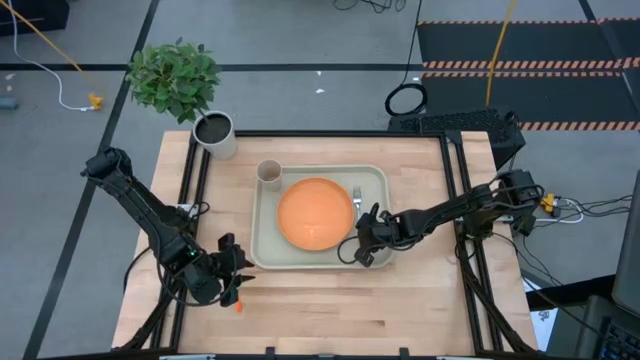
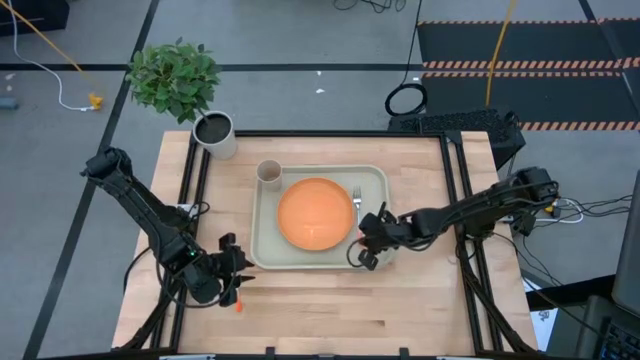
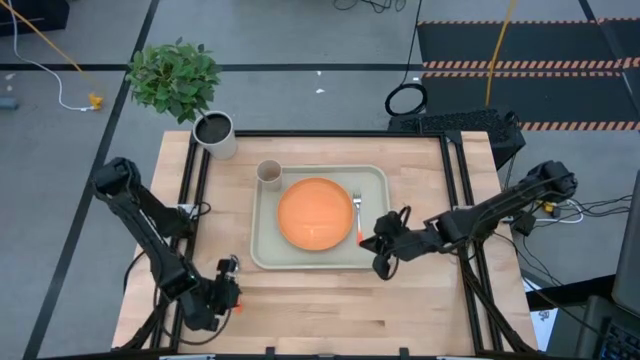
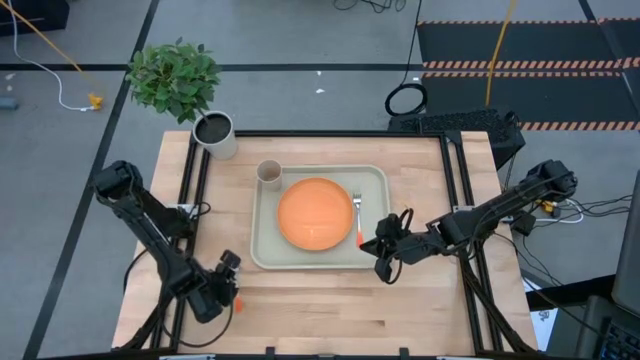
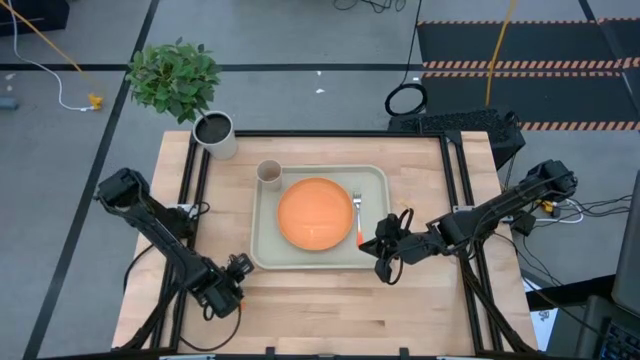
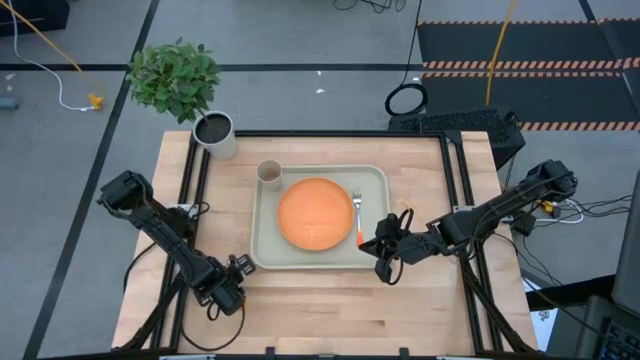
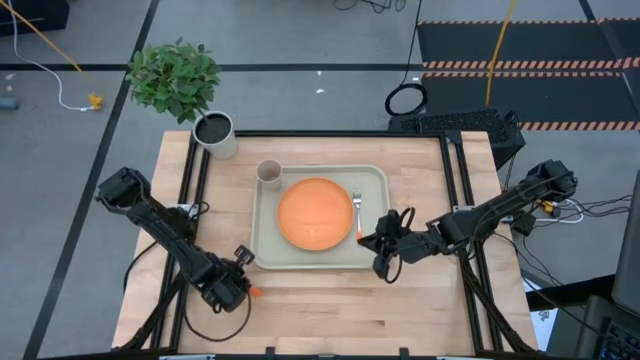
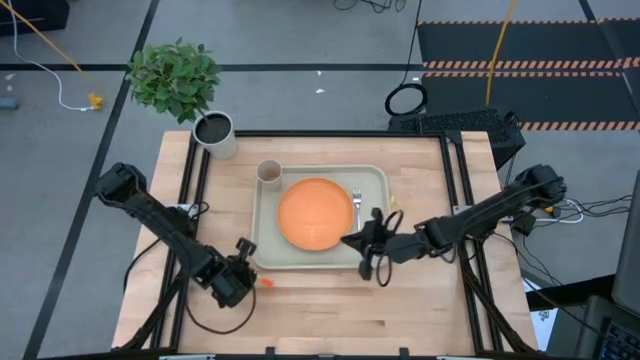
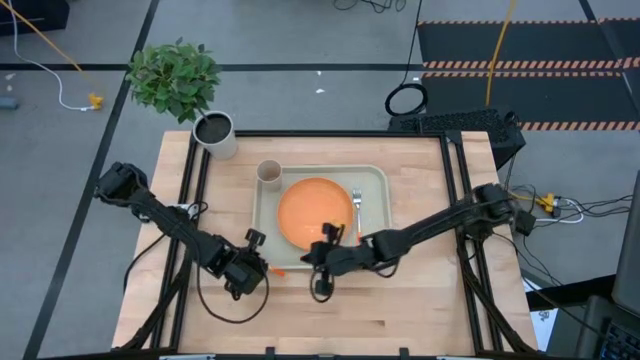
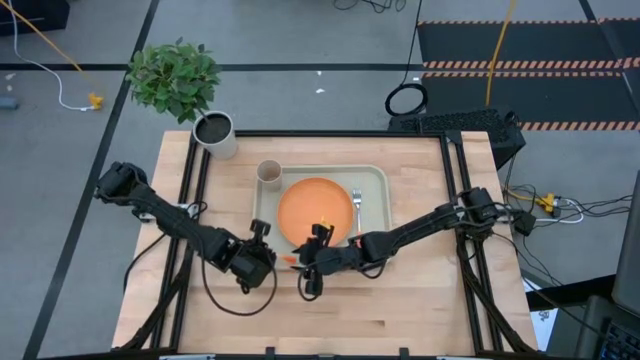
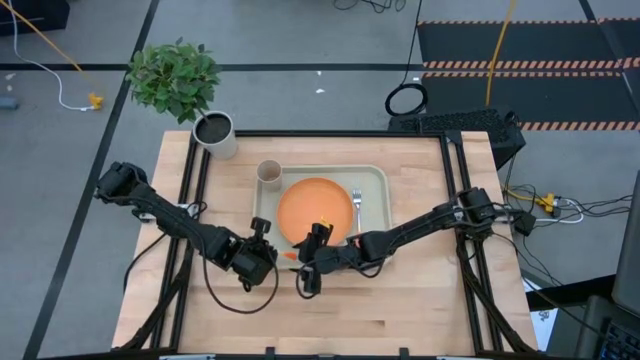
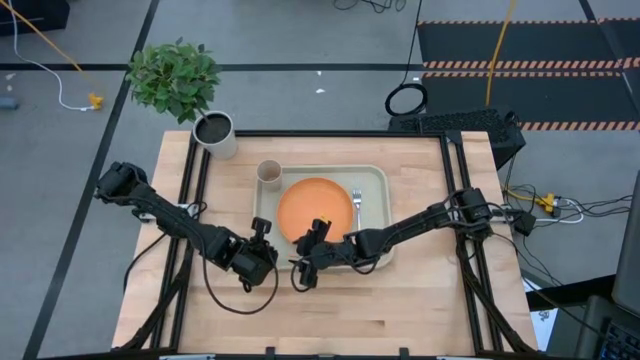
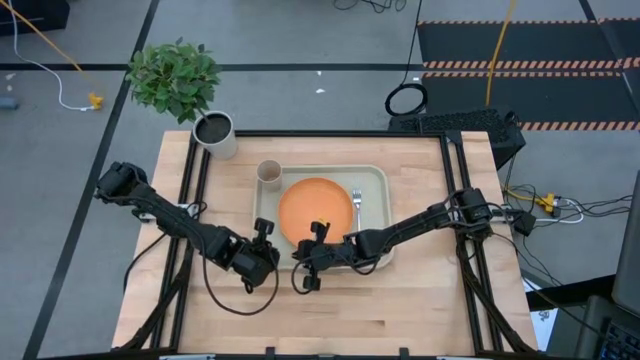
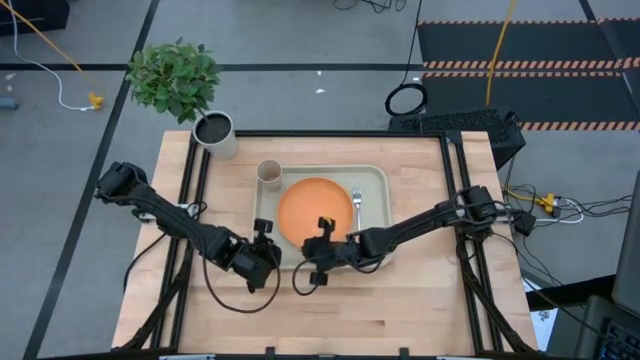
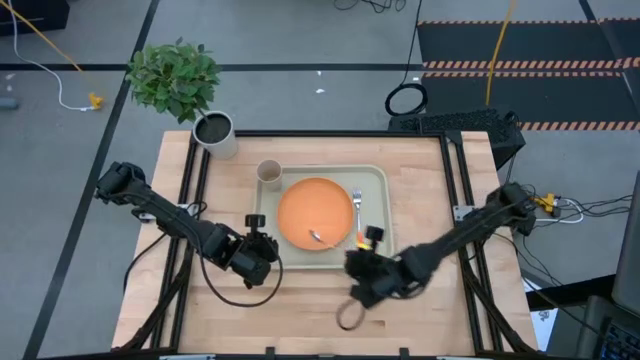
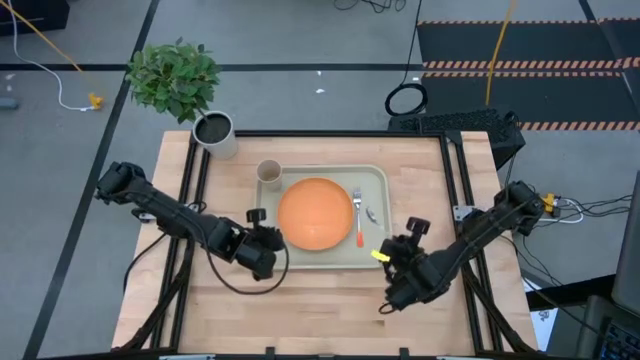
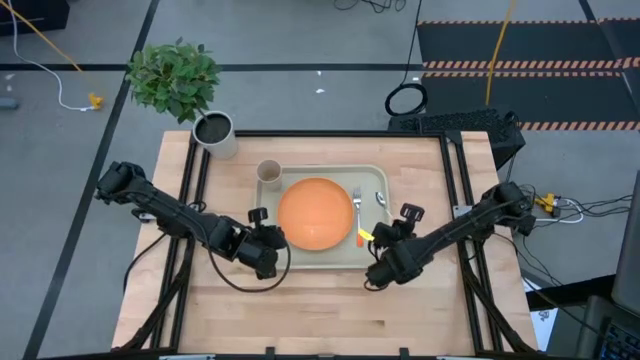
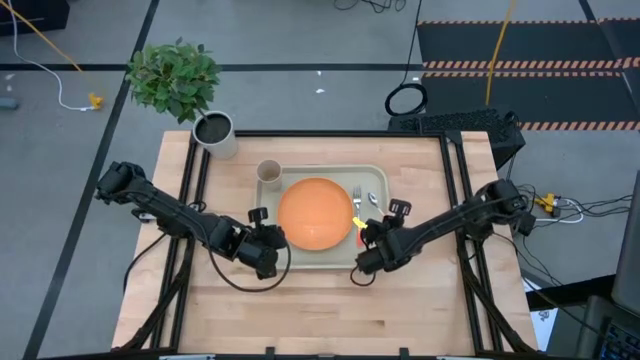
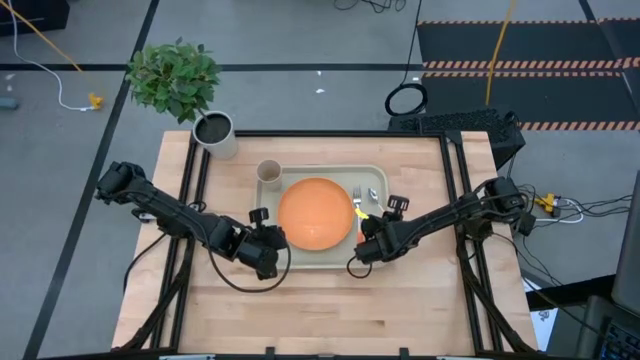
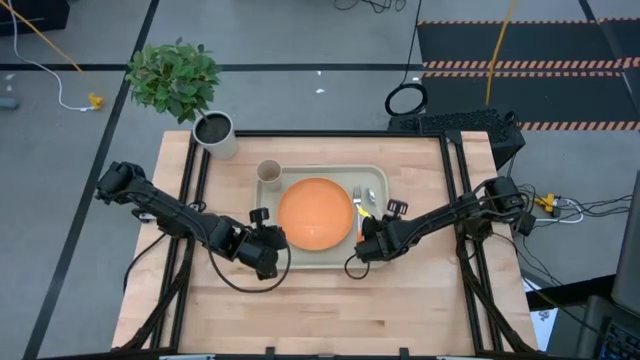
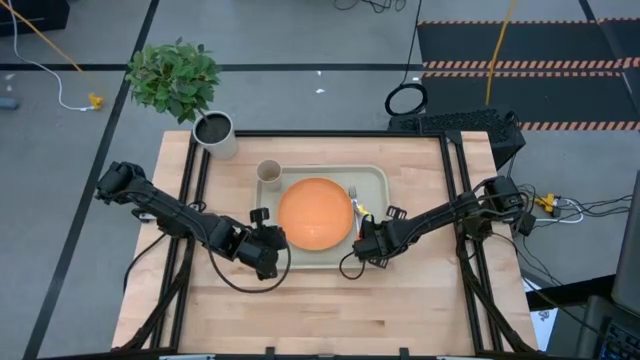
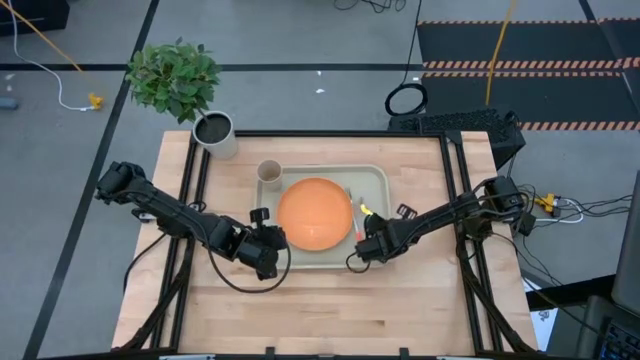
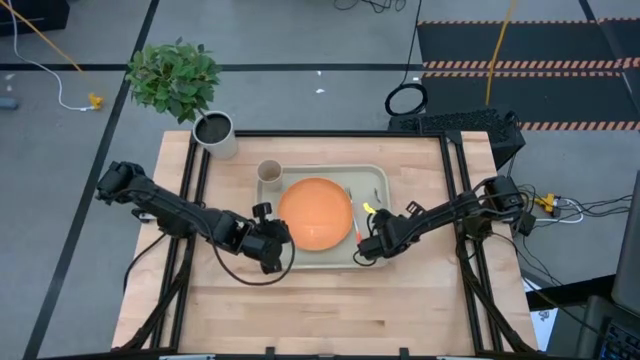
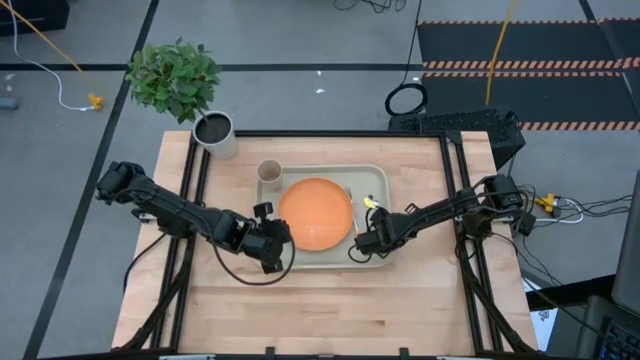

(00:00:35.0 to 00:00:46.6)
Task: Pick and place plate/cup/fork/spoon on tray
Put the orange spoon on the white serving tray to the right of the orange fork

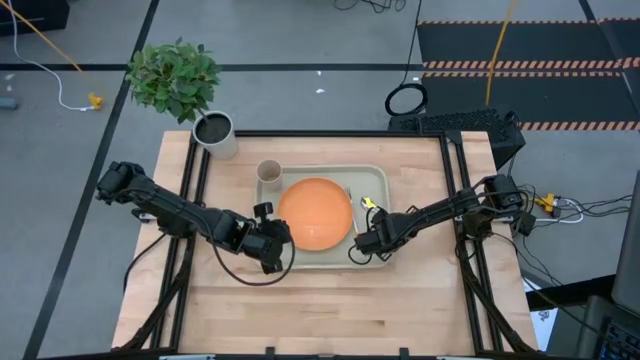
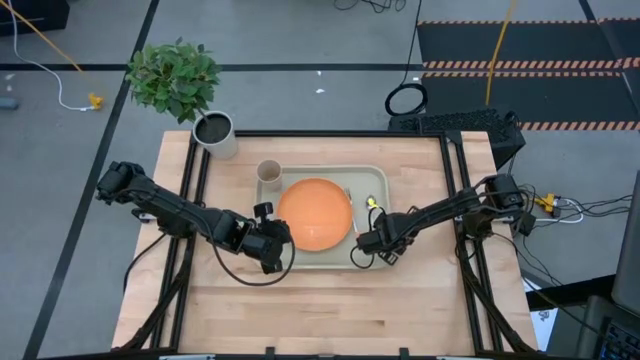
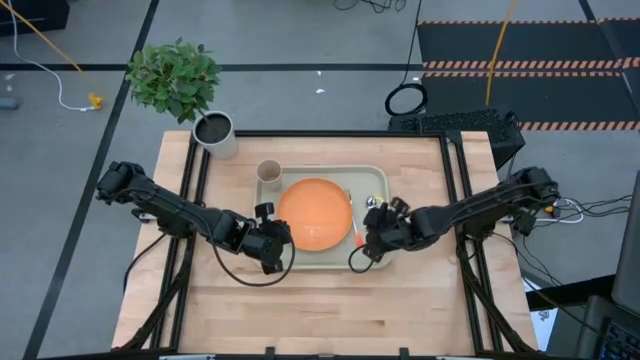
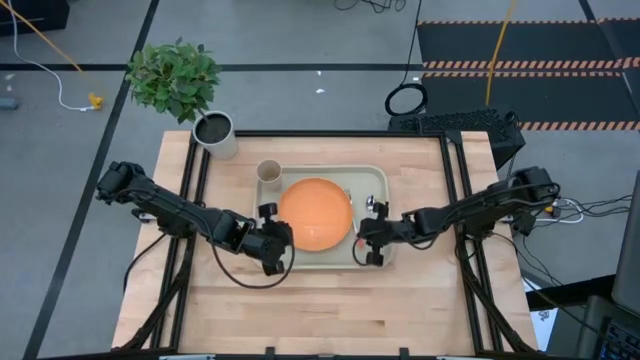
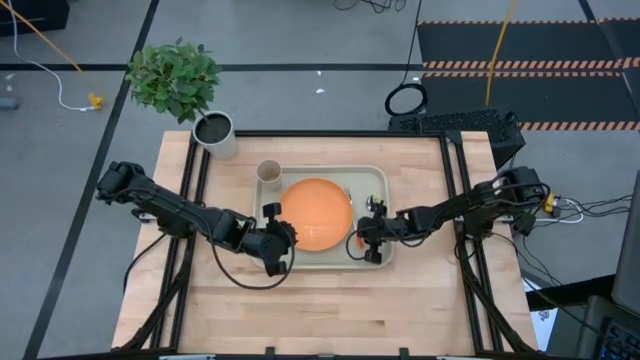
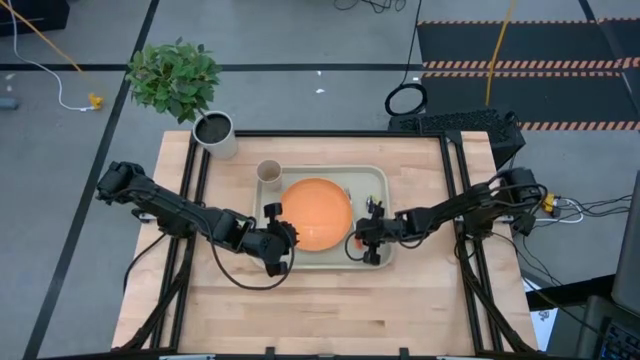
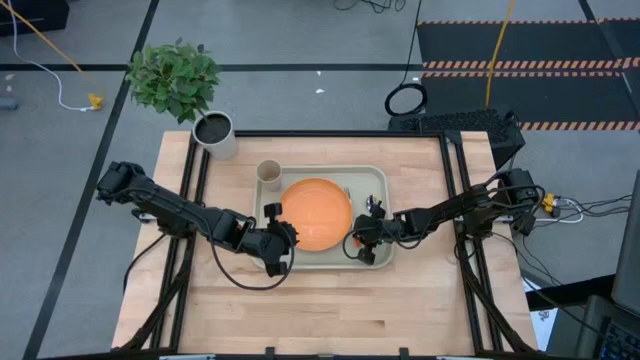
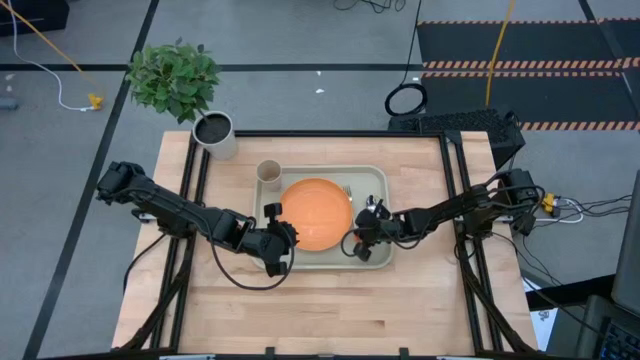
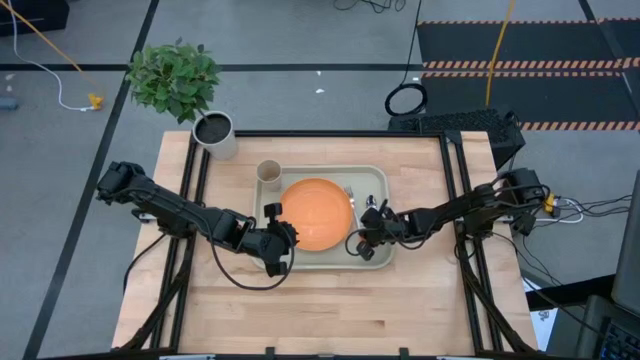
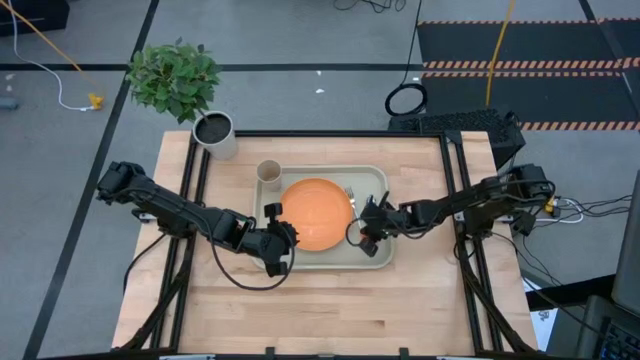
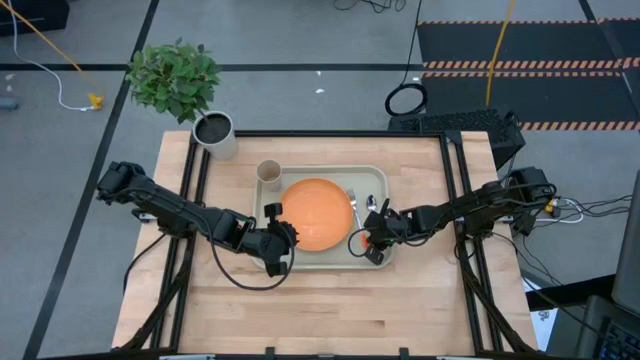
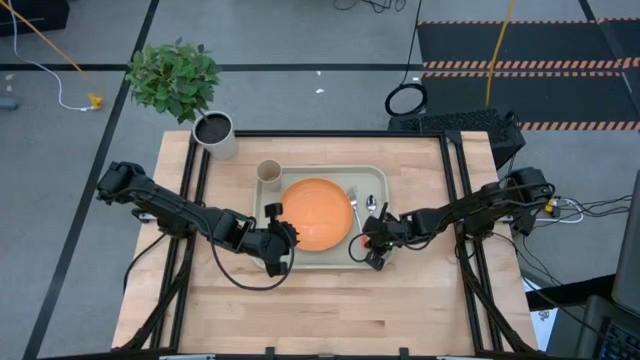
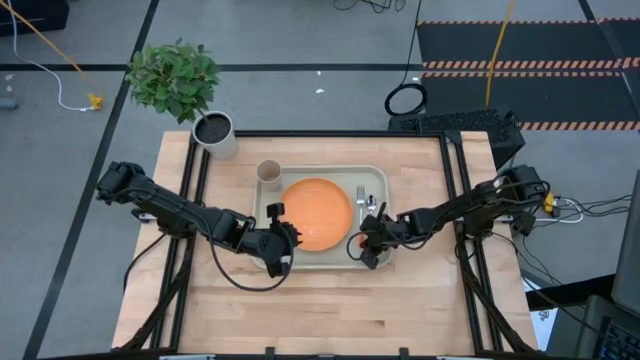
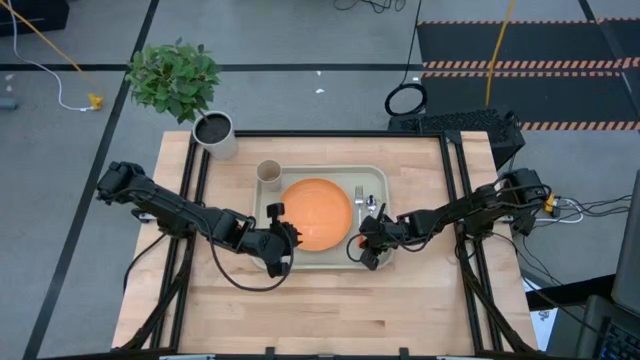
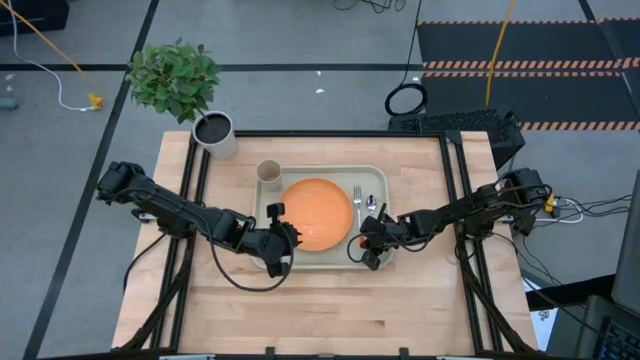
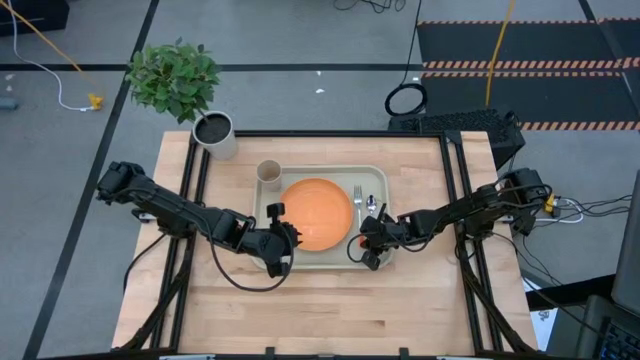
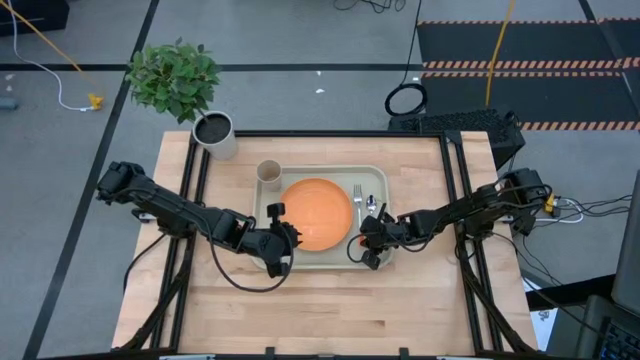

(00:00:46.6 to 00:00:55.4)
Adjust the orange fork

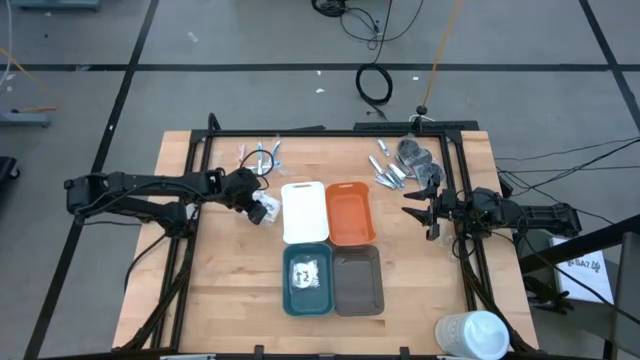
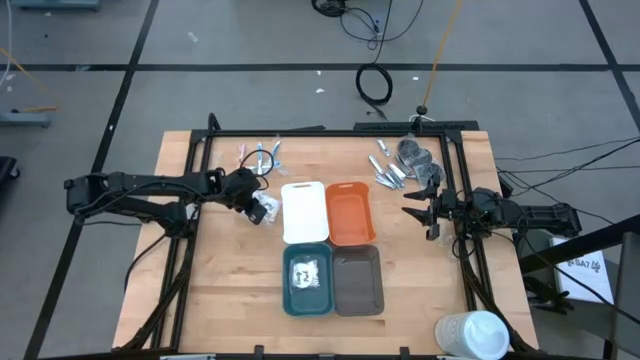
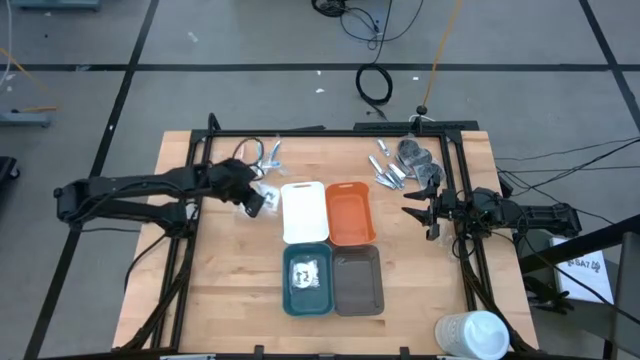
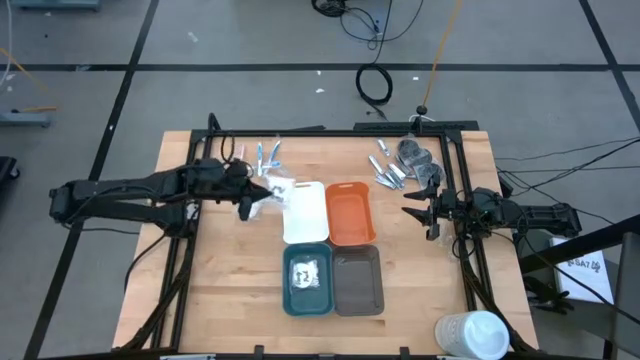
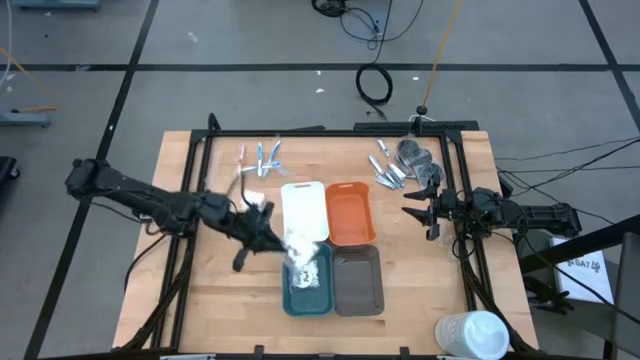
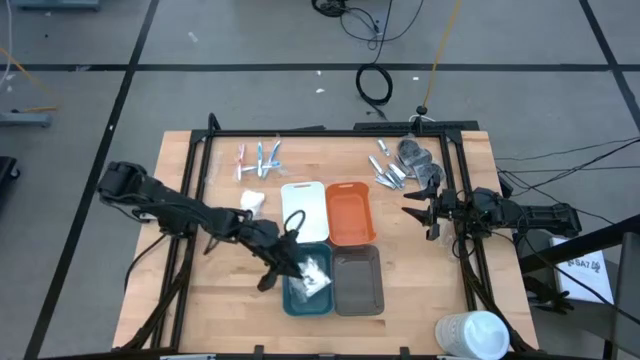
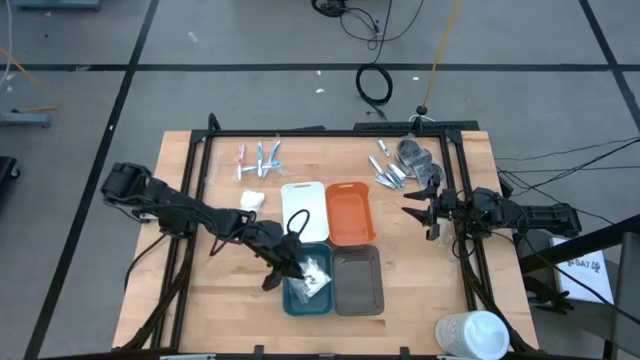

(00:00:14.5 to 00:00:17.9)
Task: Pick & Place Travel size toiletries
Put the right vanity pack into the blue bin
